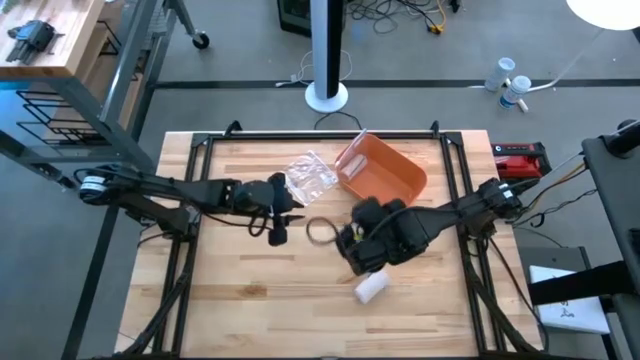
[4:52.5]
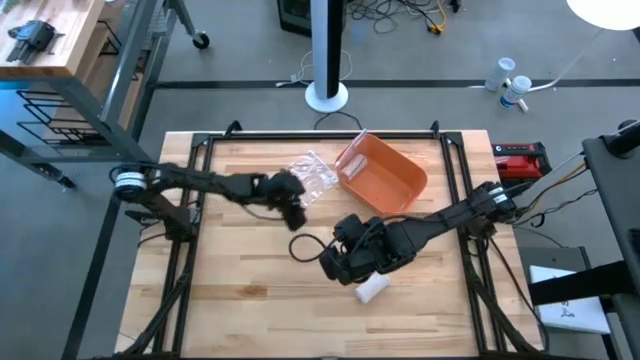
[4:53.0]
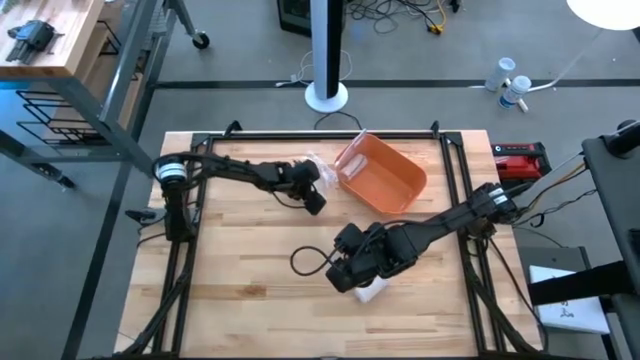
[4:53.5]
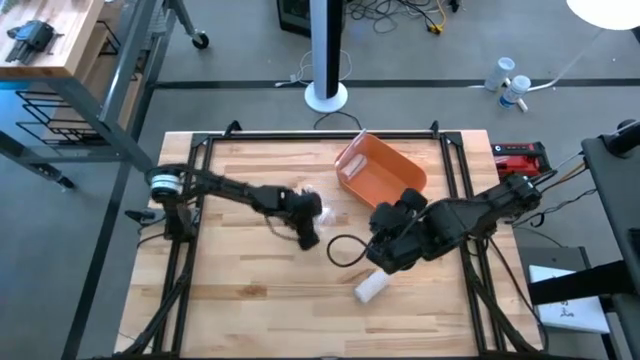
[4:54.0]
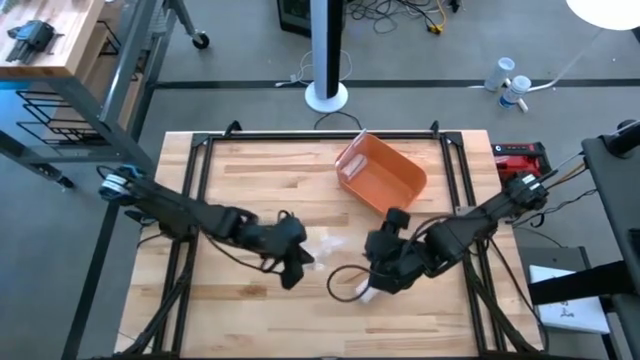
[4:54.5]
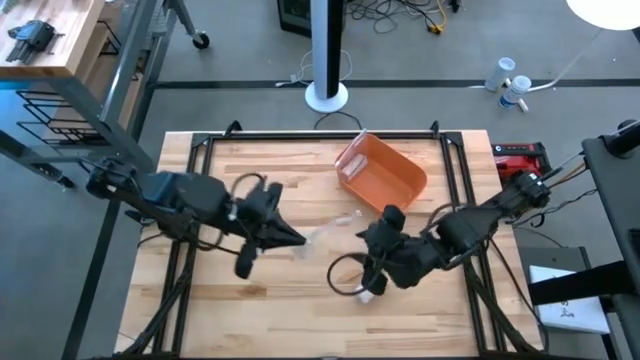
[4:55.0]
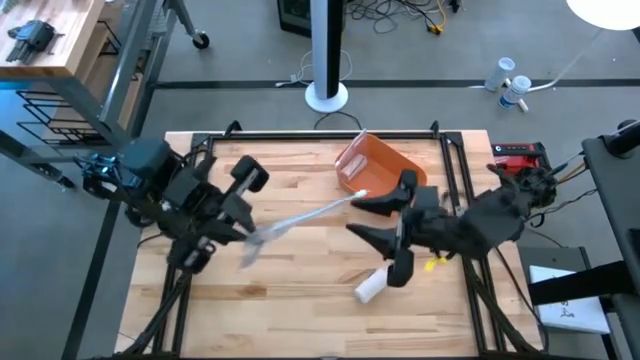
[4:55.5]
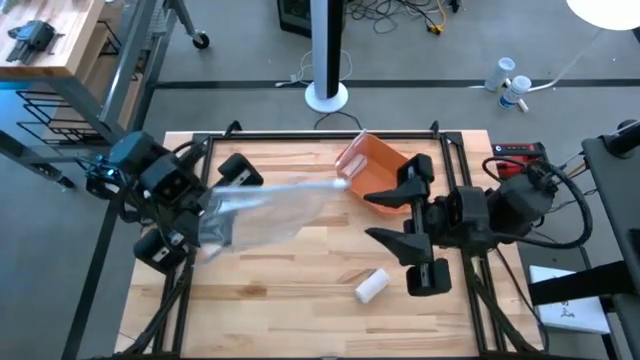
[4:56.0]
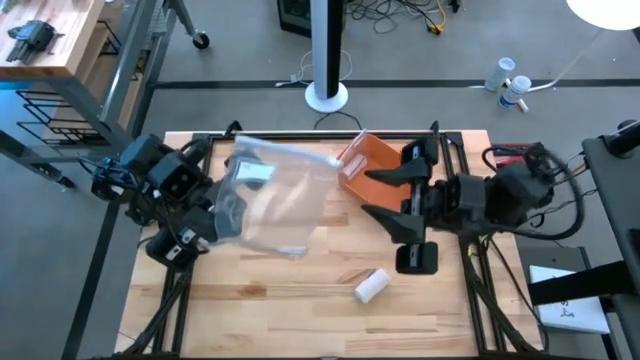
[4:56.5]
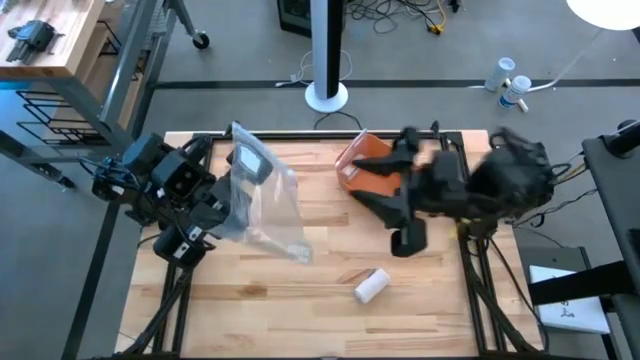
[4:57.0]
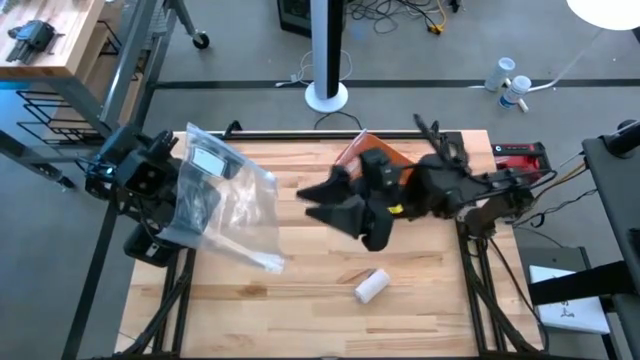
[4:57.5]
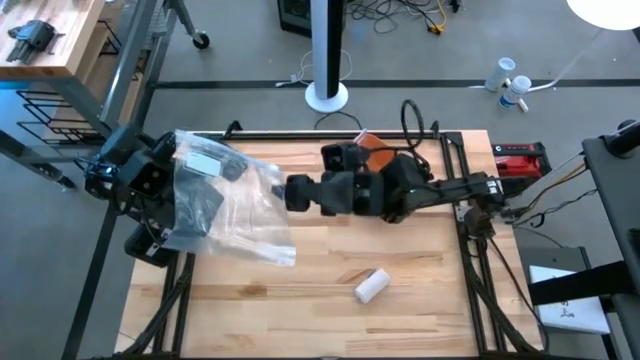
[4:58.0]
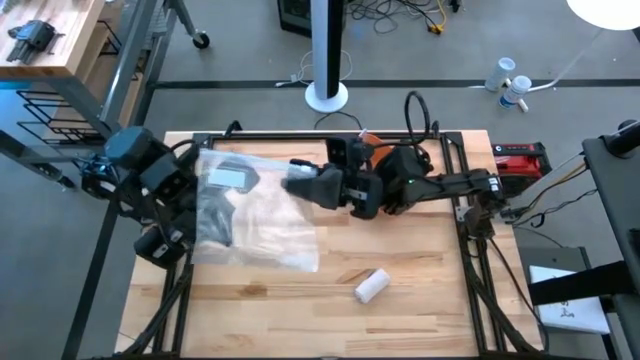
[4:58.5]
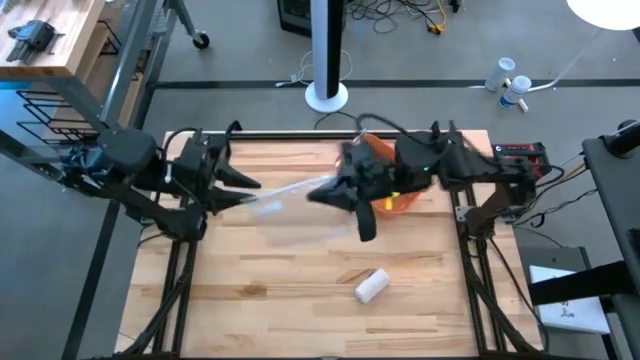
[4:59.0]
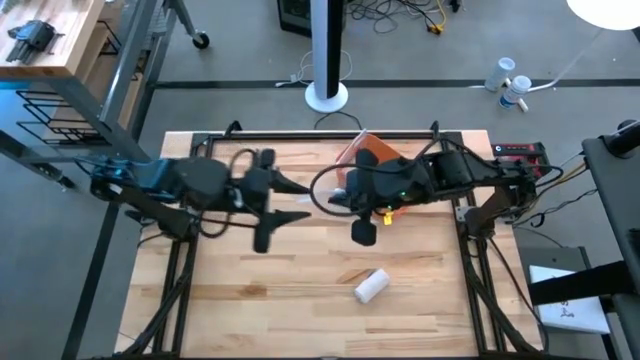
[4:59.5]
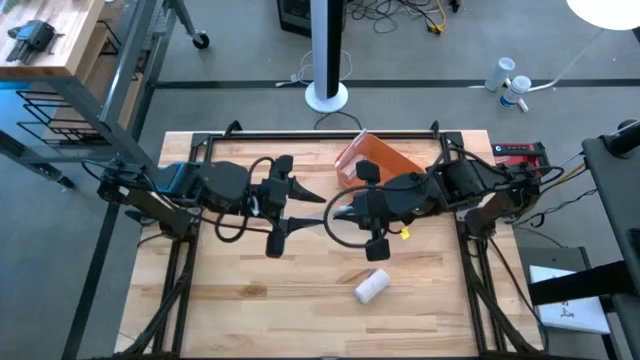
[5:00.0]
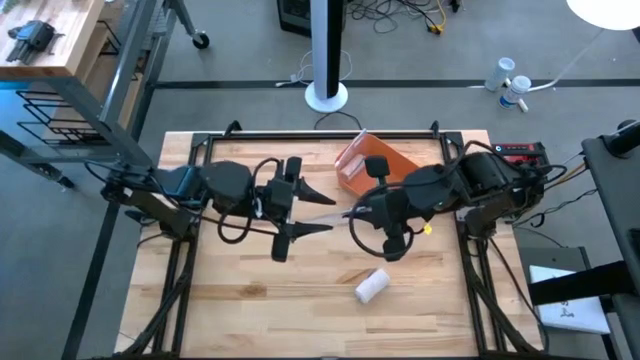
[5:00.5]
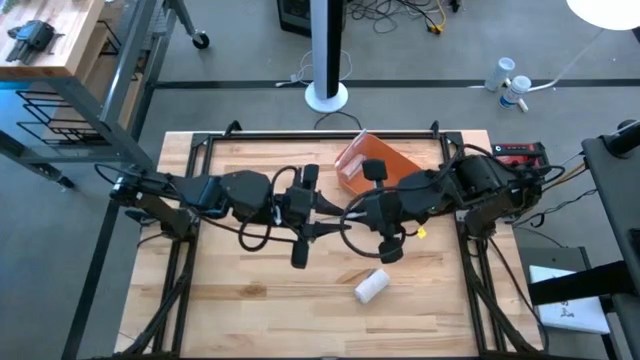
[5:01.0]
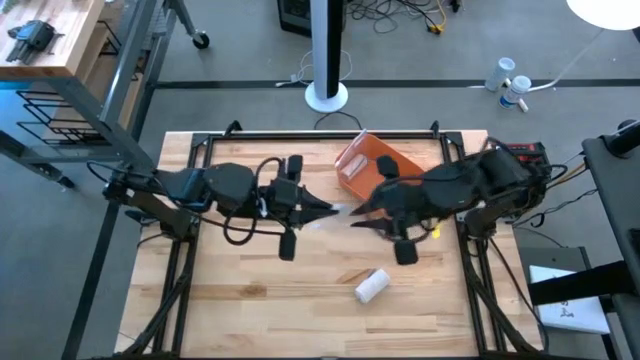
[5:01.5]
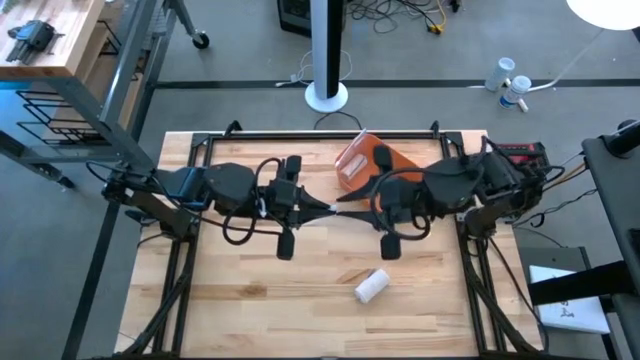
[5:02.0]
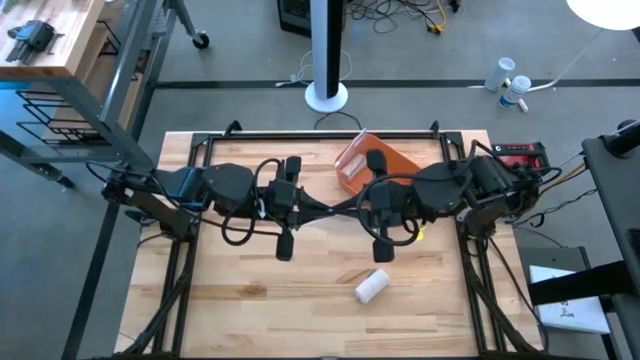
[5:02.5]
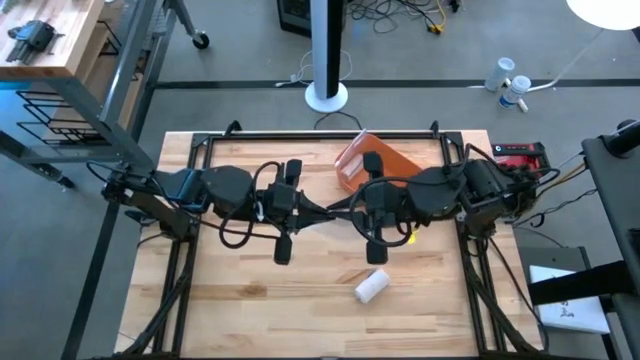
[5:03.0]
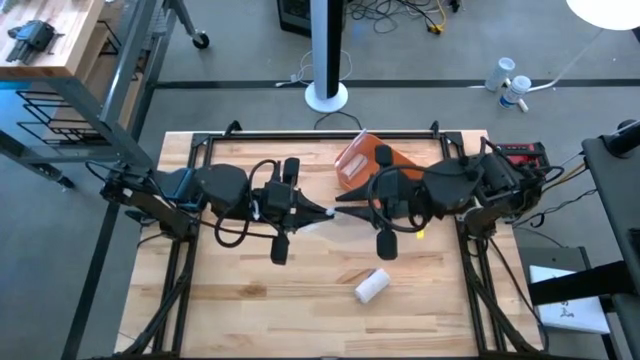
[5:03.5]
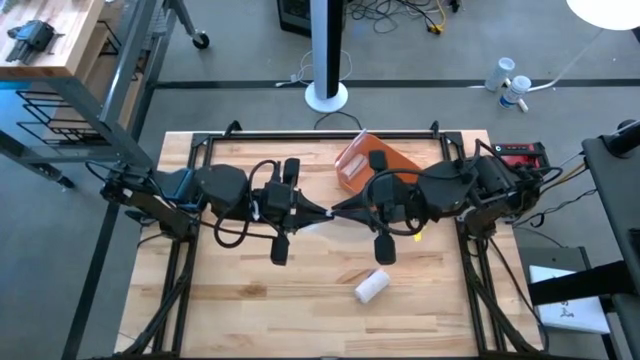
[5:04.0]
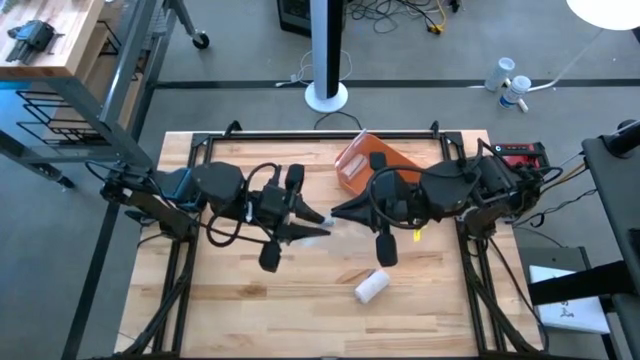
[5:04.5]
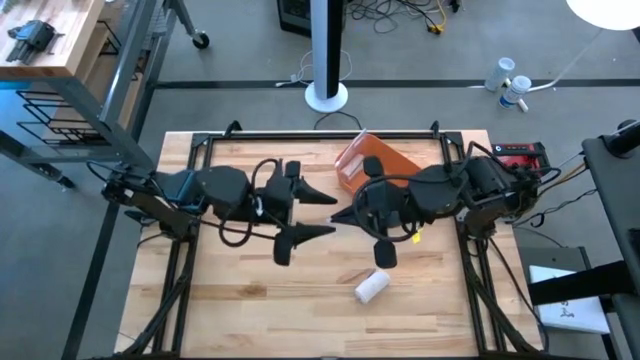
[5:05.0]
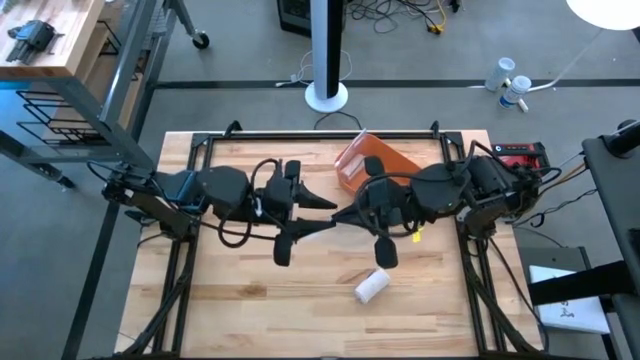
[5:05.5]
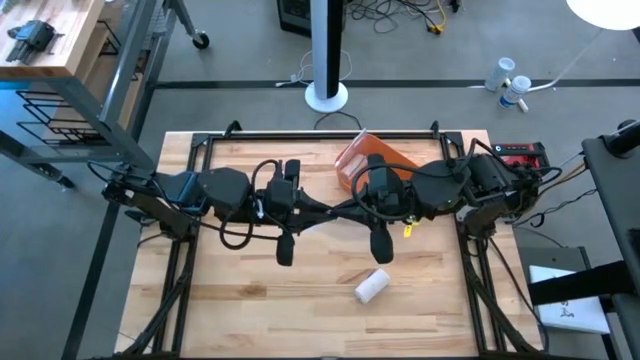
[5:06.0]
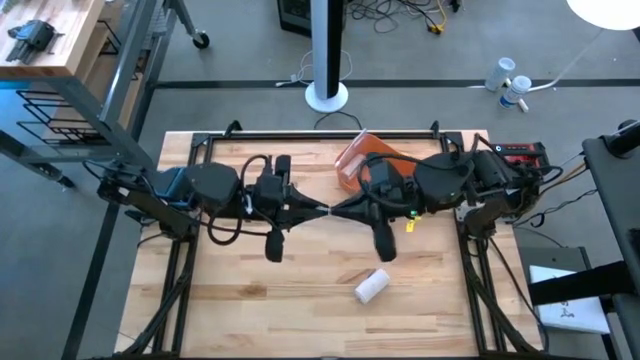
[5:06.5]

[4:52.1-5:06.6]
Task: Roll bandage
Open the transparent zip bag

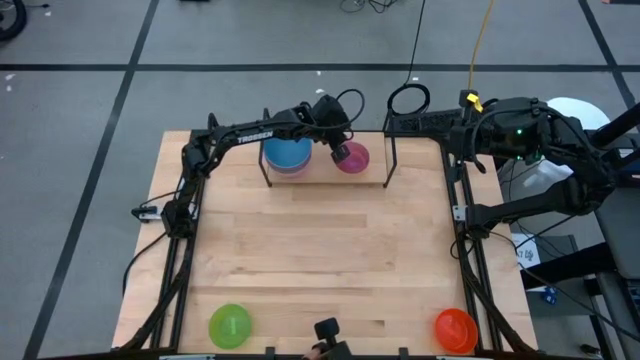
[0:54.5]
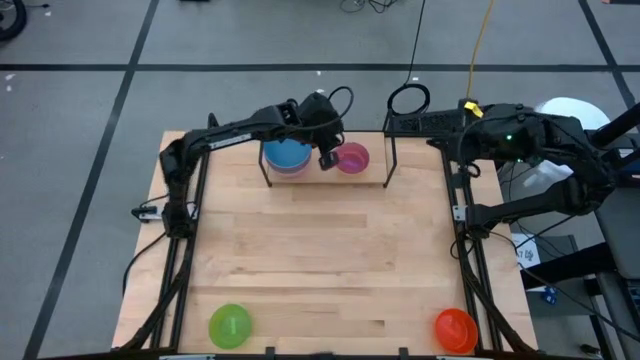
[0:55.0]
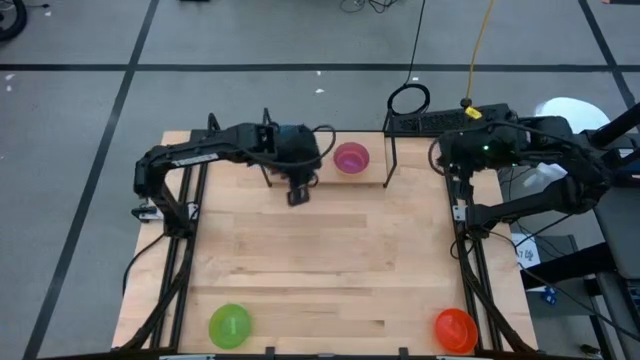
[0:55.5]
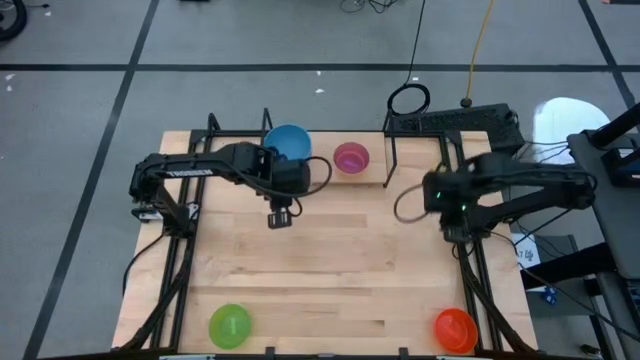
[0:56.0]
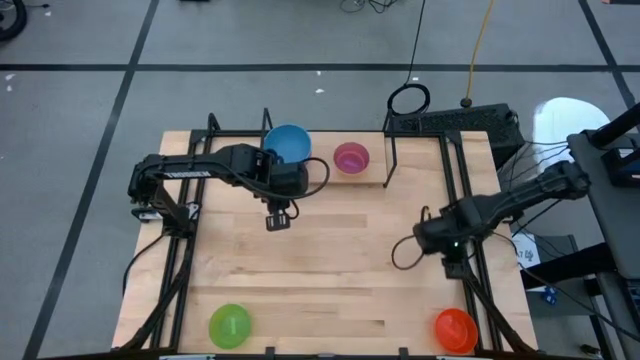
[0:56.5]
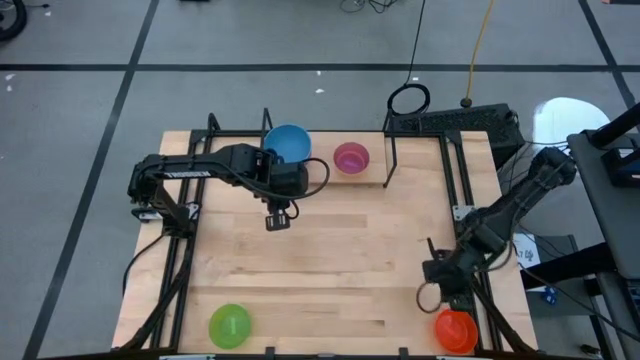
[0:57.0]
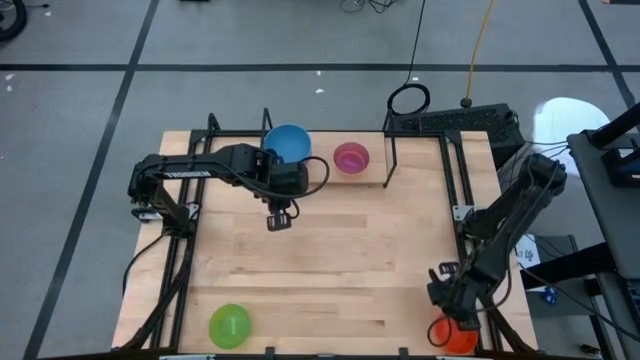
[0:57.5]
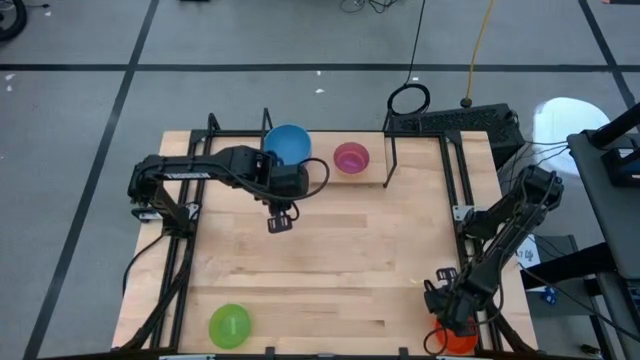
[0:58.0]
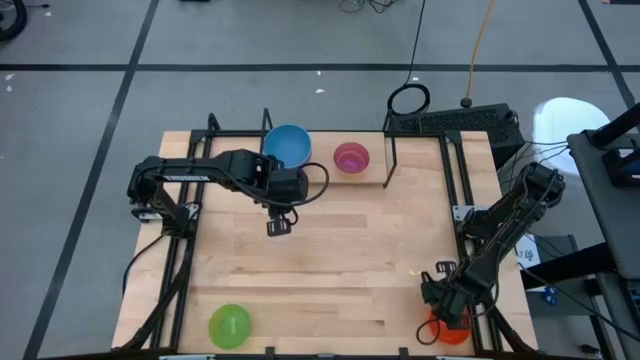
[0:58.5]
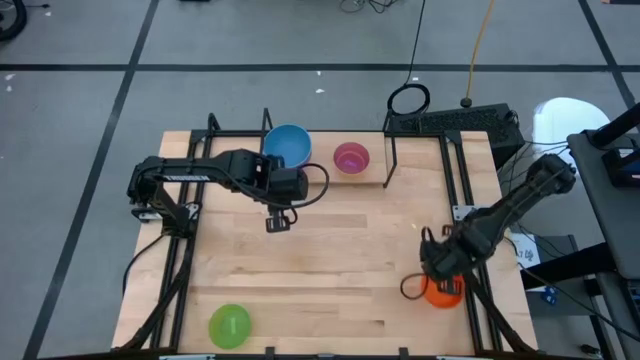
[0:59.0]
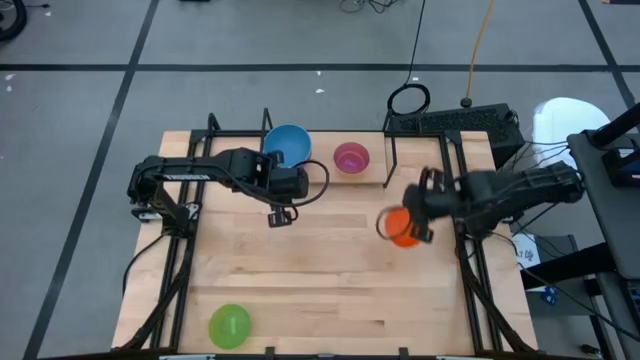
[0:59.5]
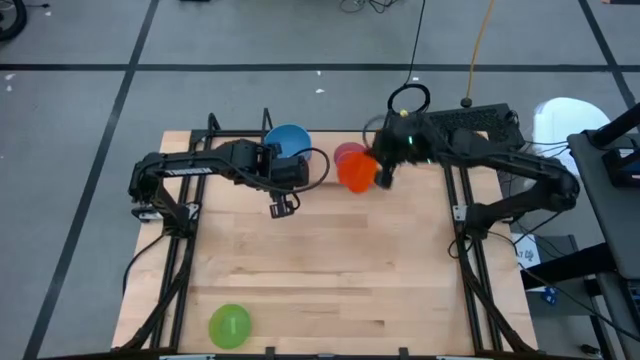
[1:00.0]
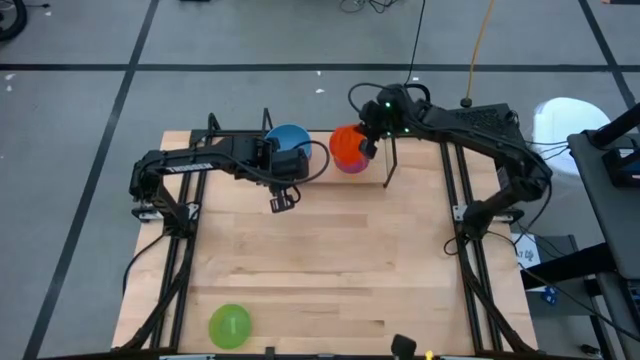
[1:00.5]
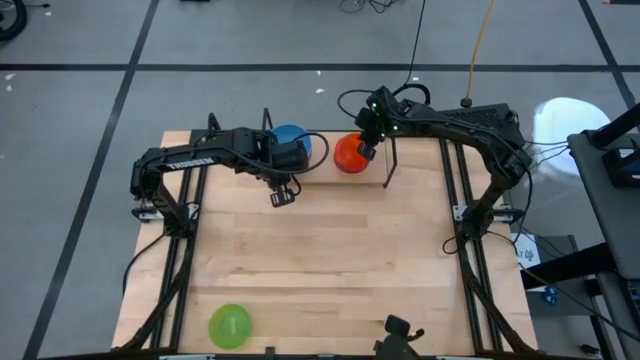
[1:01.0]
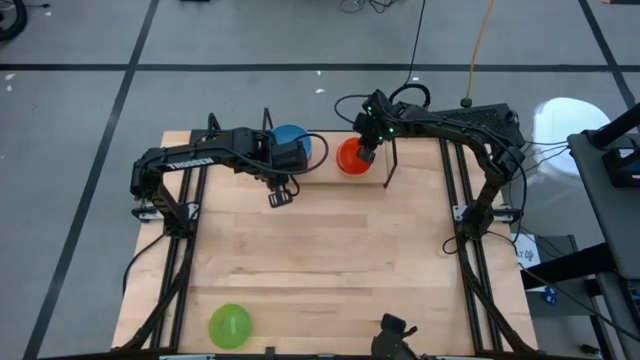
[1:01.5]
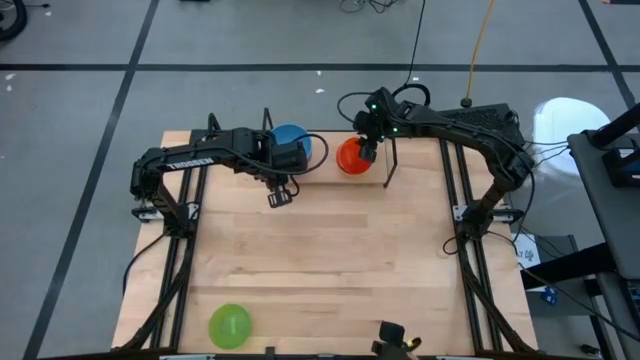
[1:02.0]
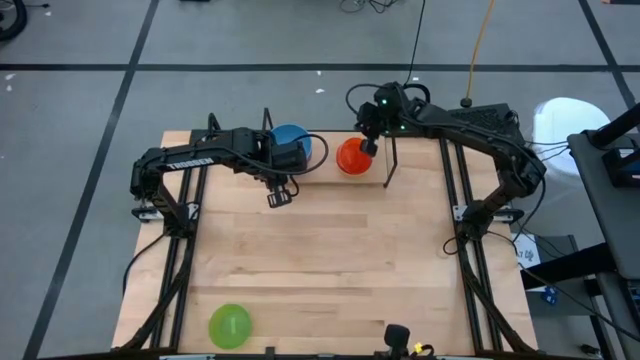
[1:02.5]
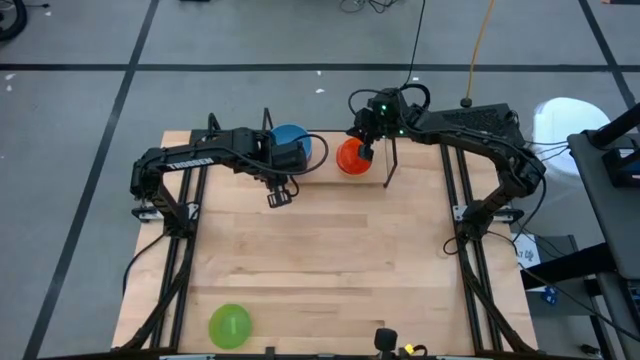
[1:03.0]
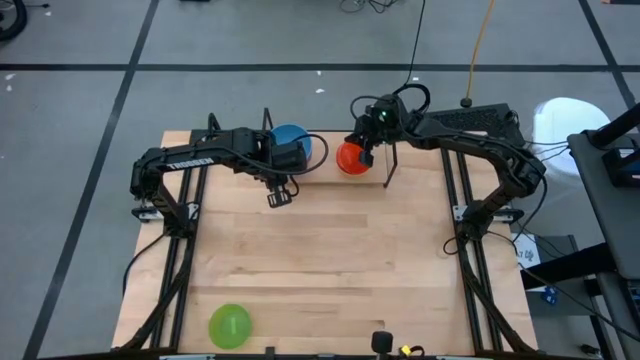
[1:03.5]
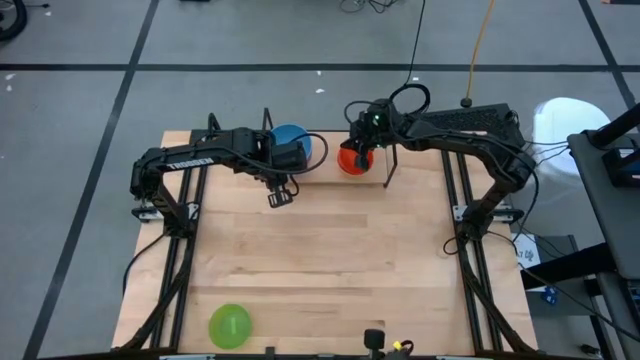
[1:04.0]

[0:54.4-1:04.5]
Task: Place and stack bowls onto a shelf
Stack the orange bowl on top of the purple bowl on the shelf
